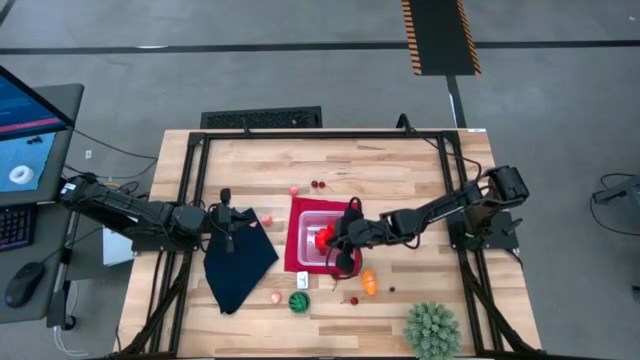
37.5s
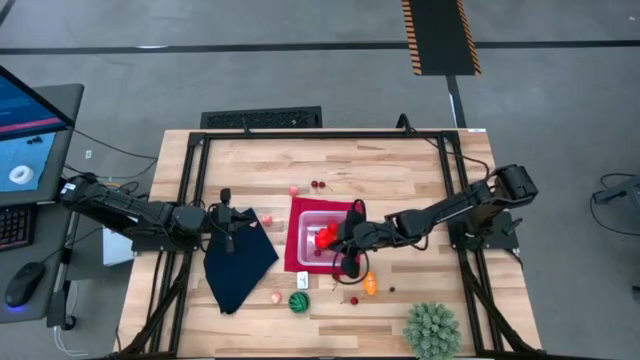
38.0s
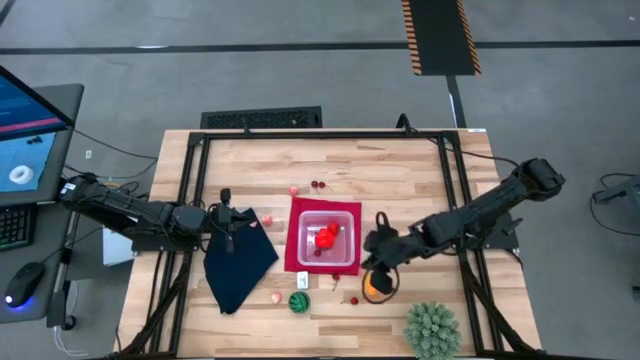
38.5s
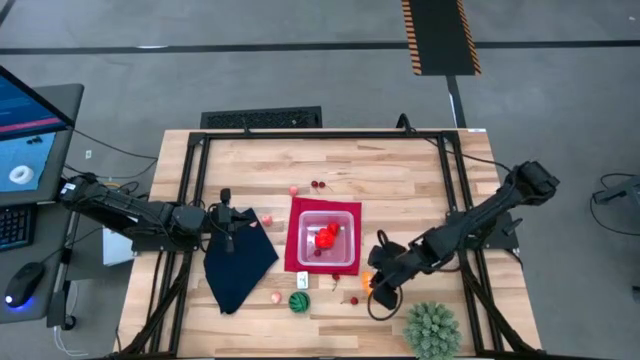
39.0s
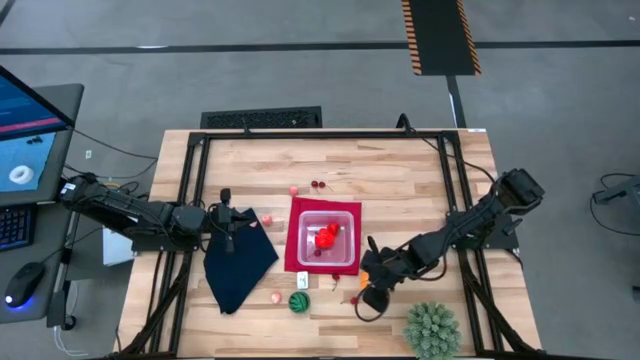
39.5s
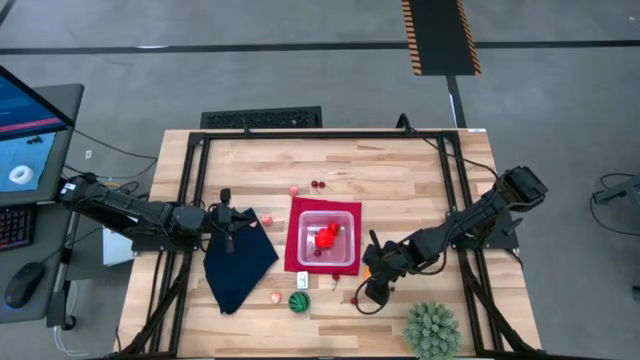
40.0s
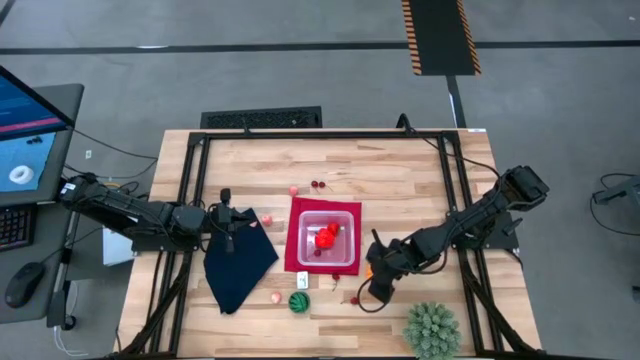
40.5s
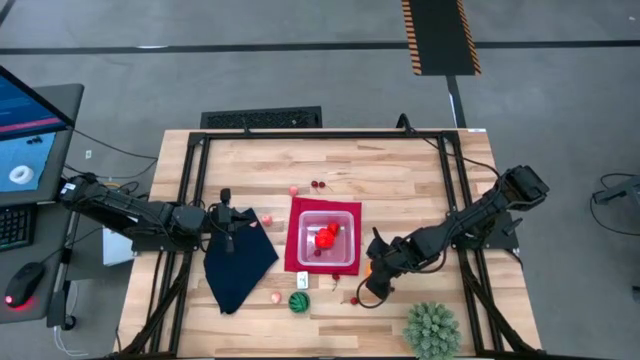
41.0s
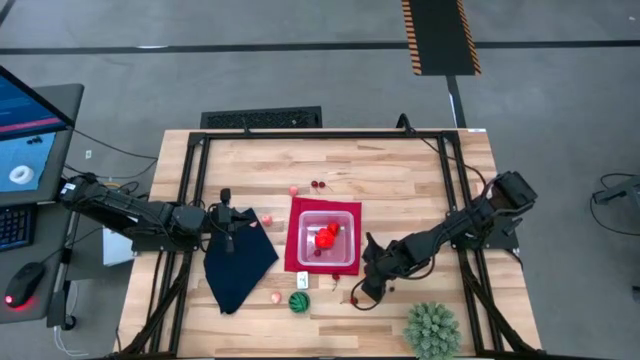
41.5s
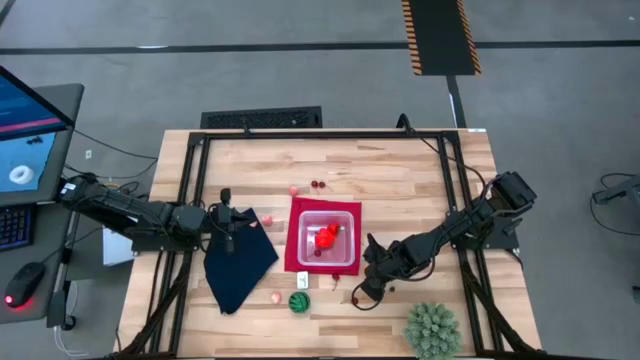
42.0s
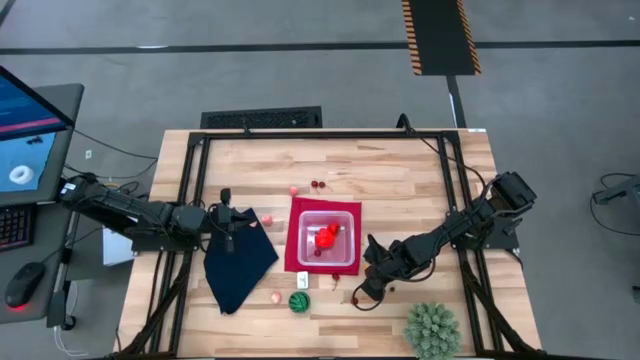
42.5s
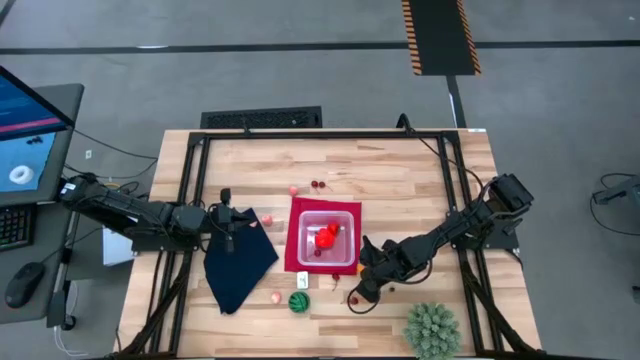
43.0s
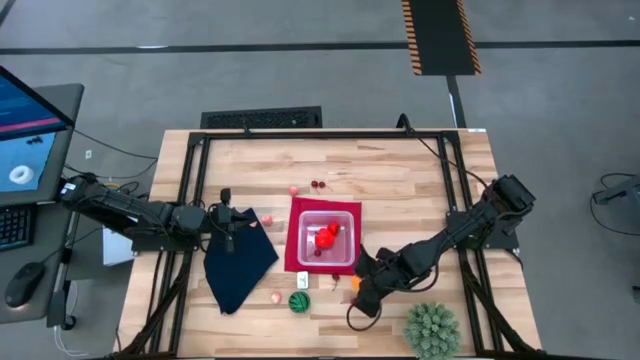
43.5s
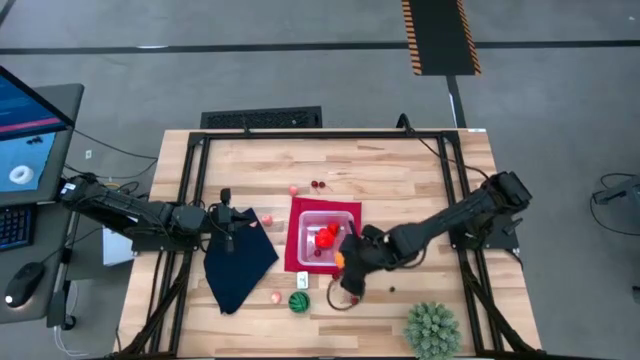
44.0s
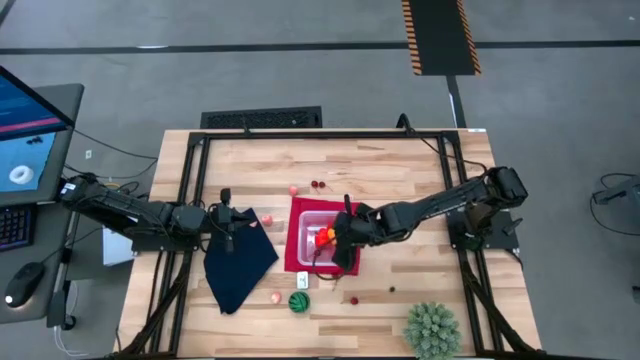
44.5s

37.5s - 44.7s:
Task: Pick and placing Produce into tupperware
Put the croissant in the transparent bin

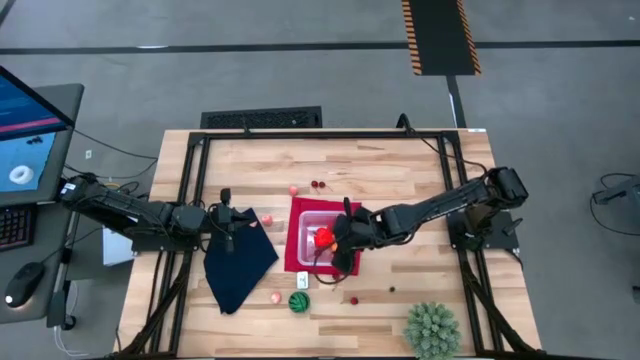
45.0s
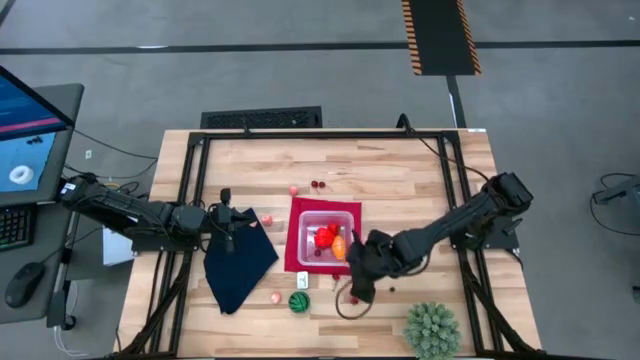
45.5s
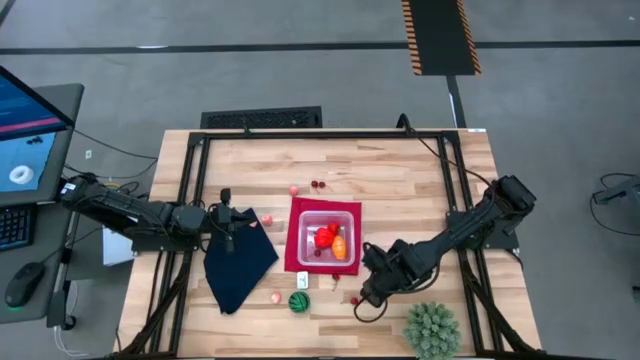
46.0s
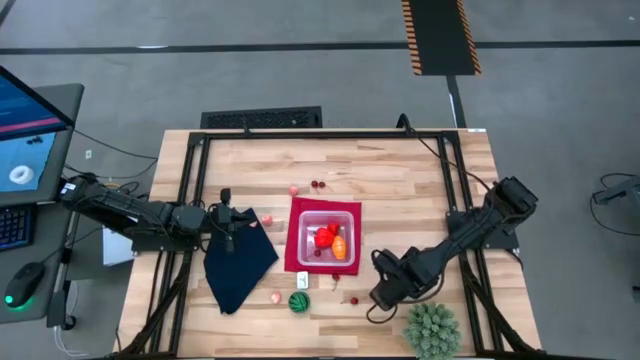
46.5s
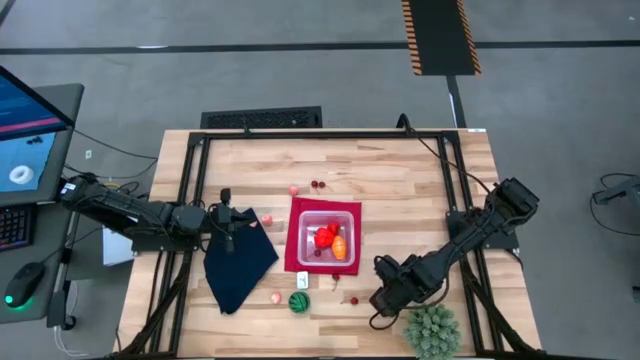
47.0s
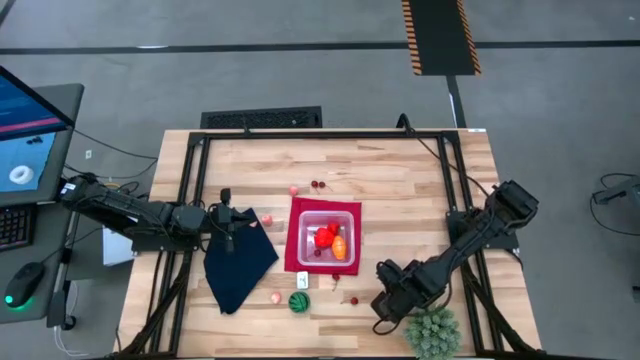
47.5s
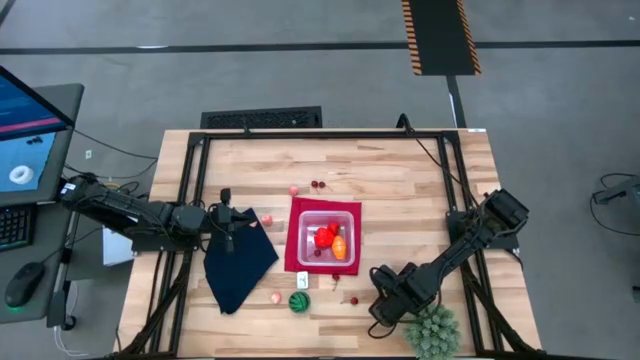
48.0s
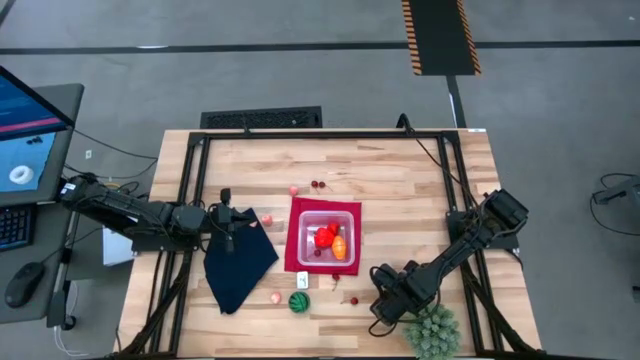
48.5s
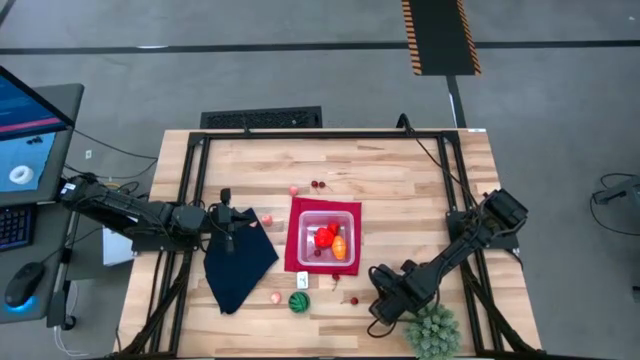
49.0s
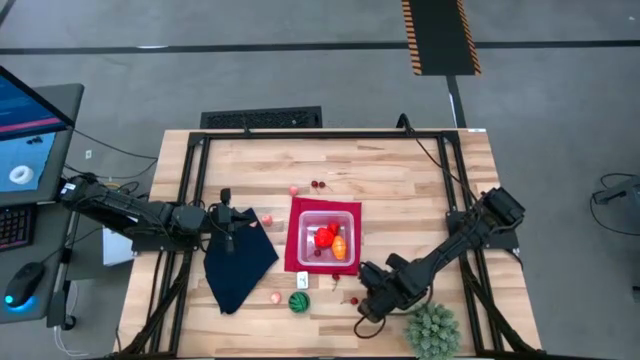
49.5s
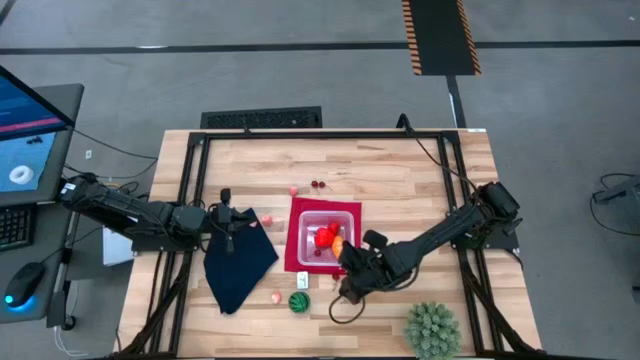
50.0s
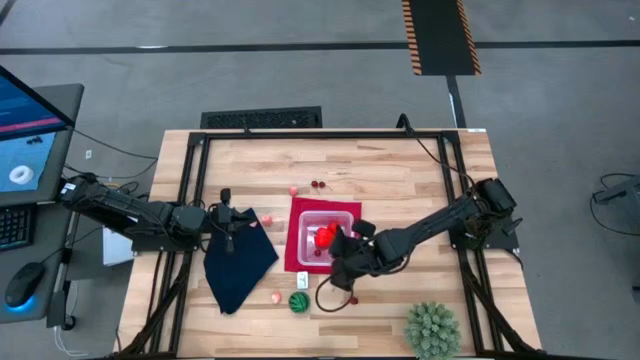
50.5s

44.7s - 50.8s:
Put the blueberry in the transparent bin

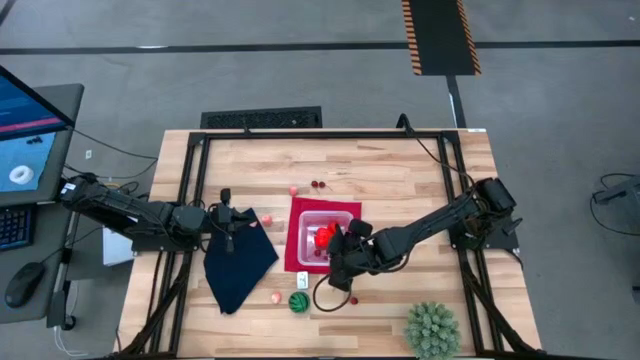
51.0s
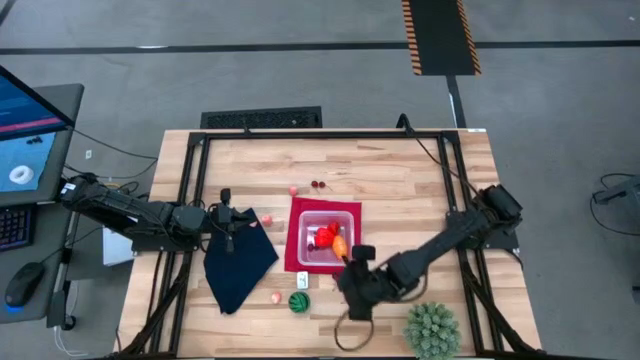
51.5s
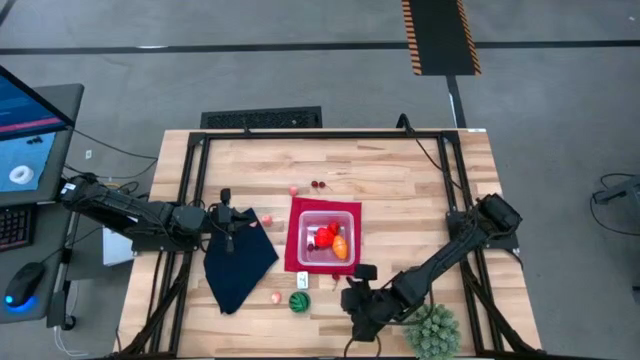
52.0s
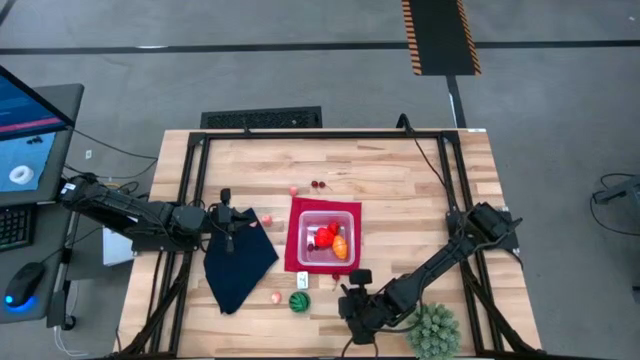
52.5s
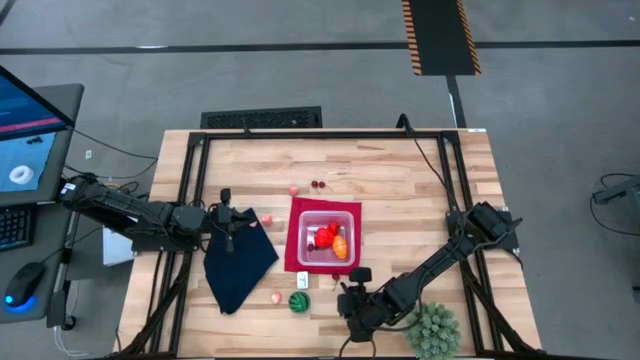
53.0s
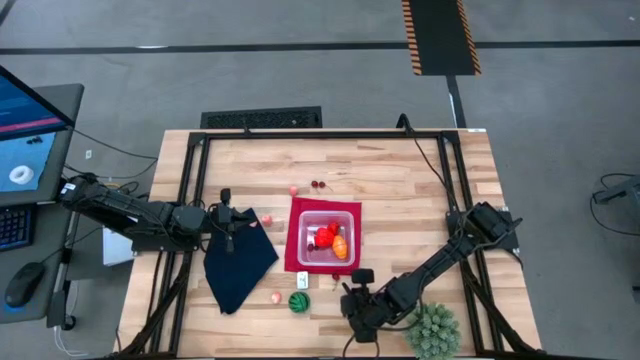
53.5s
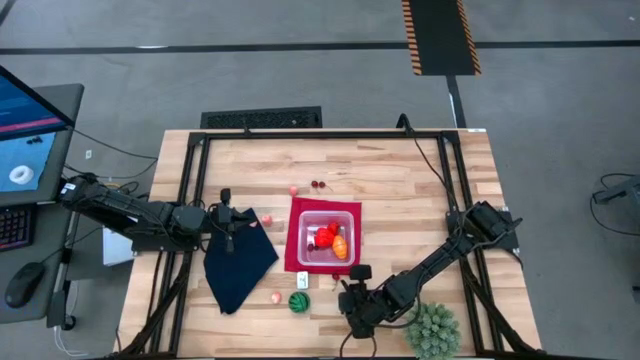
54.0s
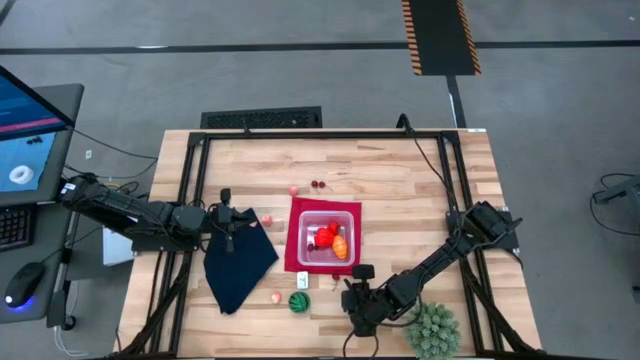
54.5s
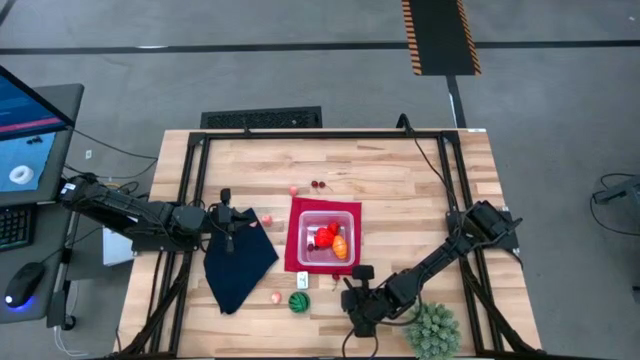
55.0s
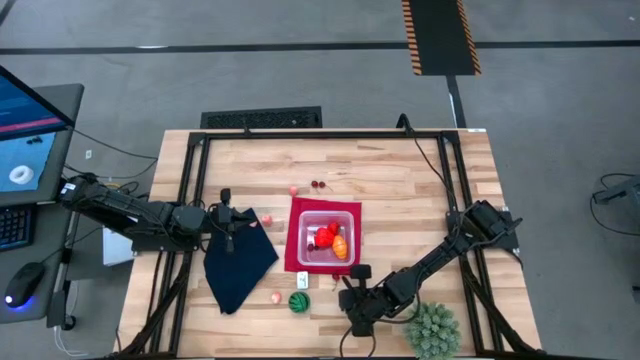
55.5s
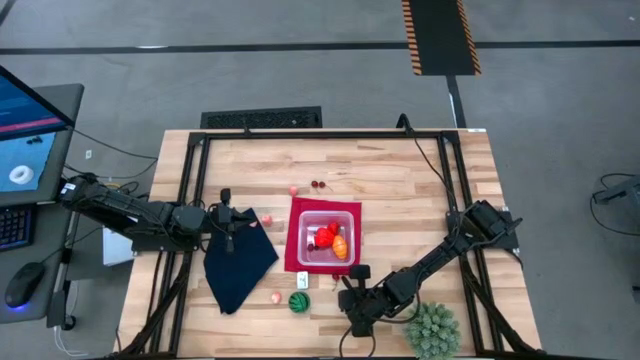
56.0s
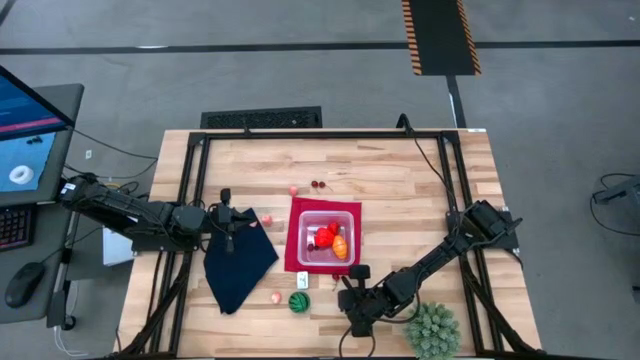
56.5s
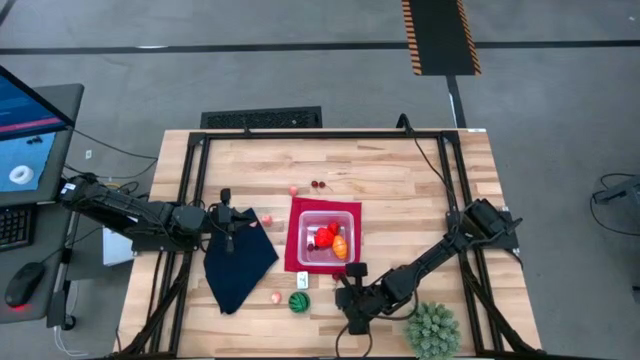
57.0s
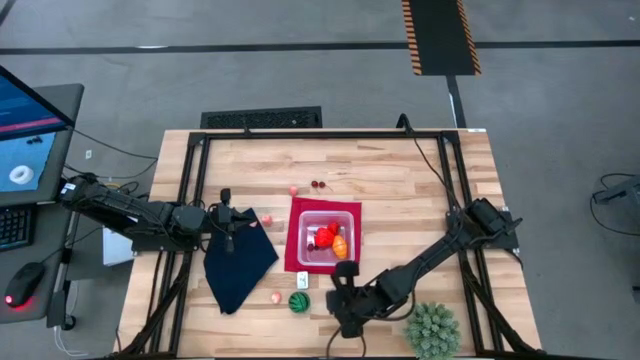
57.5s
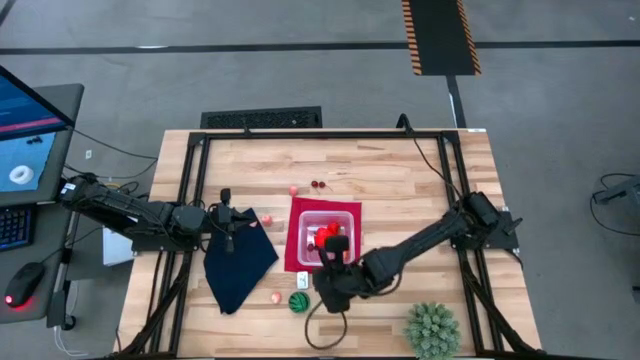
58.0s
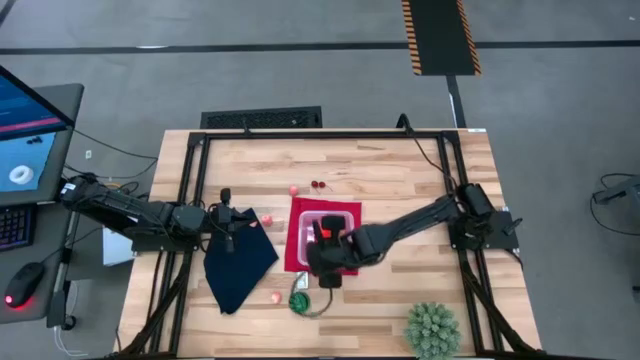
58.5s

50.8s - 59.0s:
Put the cherry in the transparent bin
